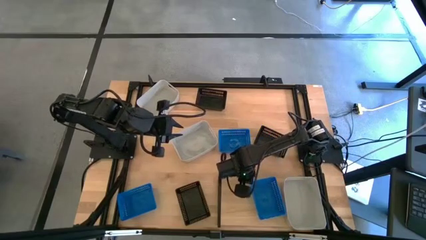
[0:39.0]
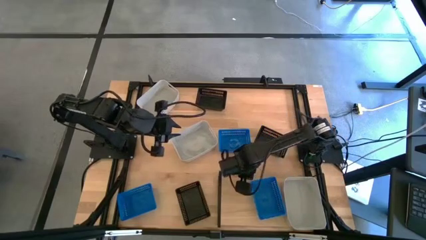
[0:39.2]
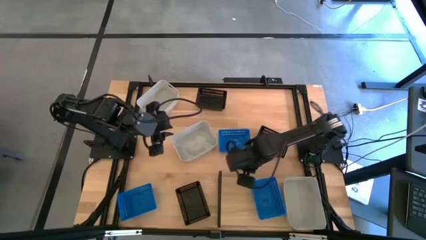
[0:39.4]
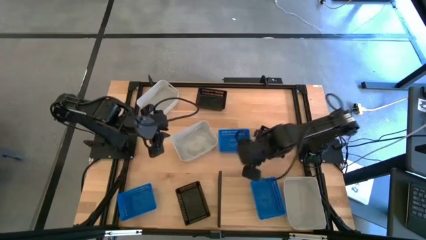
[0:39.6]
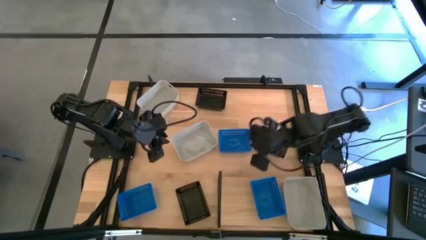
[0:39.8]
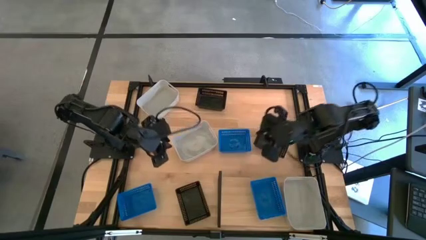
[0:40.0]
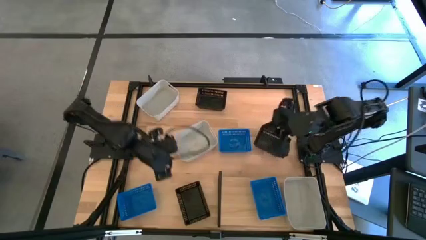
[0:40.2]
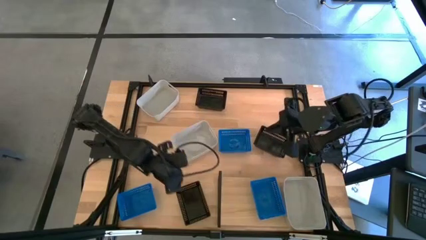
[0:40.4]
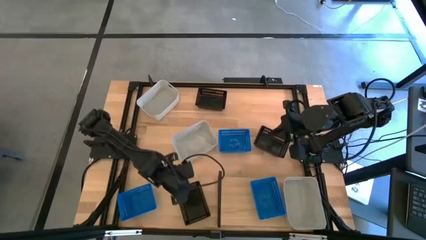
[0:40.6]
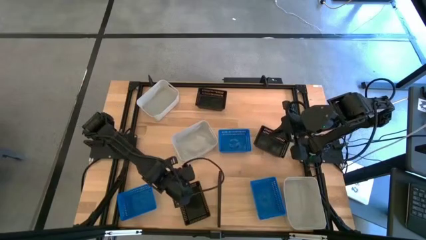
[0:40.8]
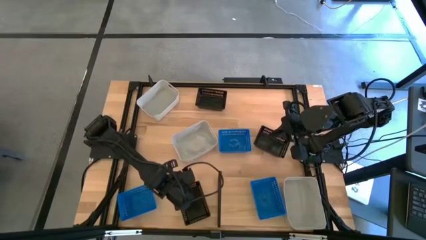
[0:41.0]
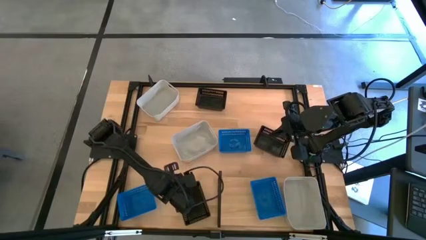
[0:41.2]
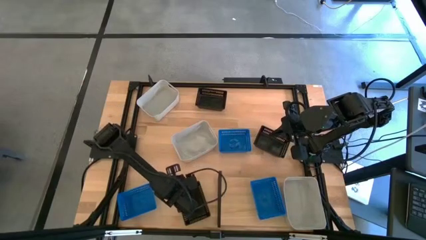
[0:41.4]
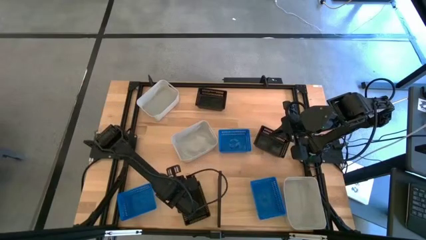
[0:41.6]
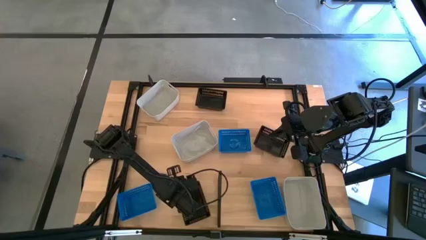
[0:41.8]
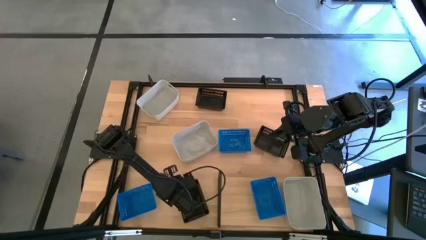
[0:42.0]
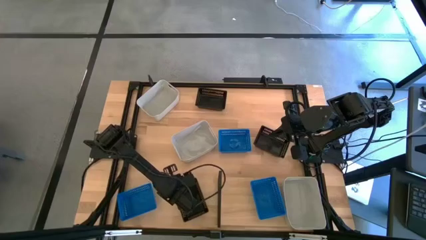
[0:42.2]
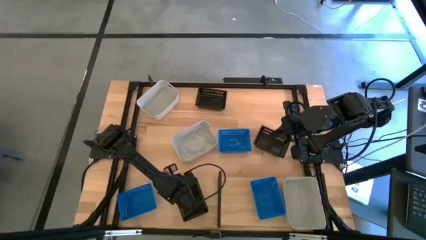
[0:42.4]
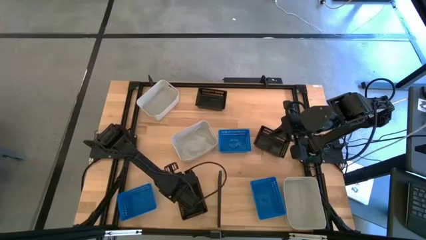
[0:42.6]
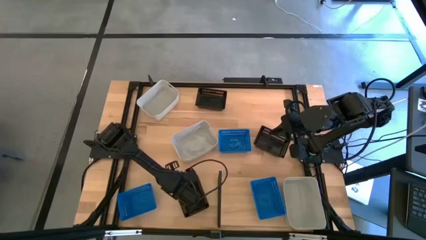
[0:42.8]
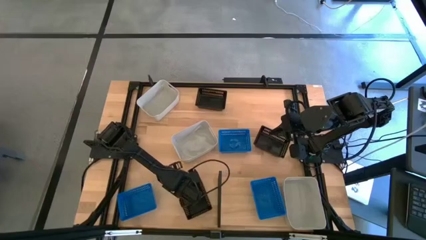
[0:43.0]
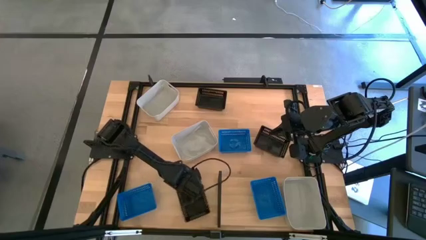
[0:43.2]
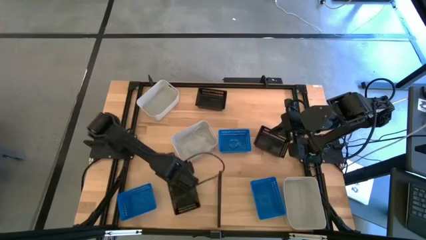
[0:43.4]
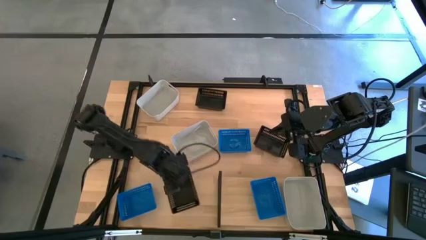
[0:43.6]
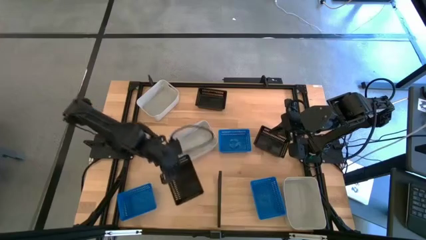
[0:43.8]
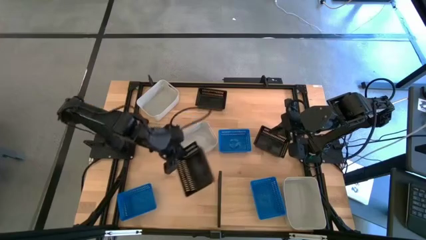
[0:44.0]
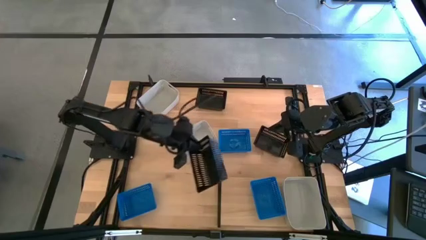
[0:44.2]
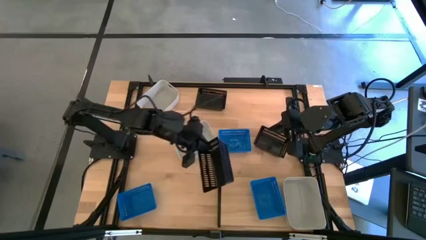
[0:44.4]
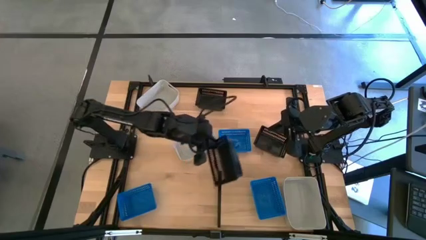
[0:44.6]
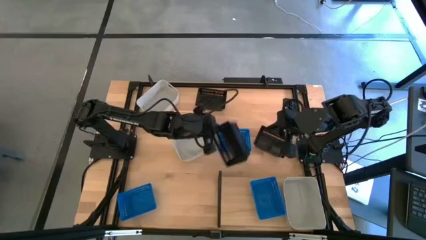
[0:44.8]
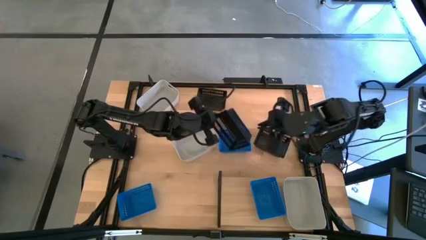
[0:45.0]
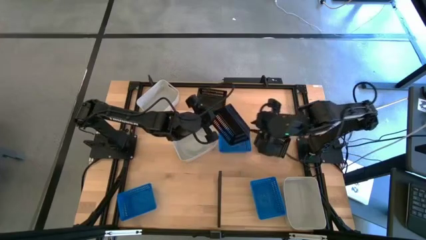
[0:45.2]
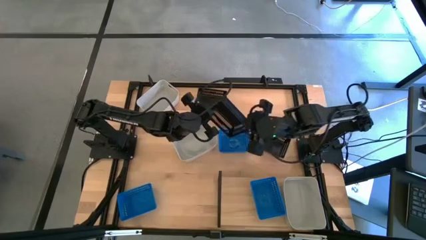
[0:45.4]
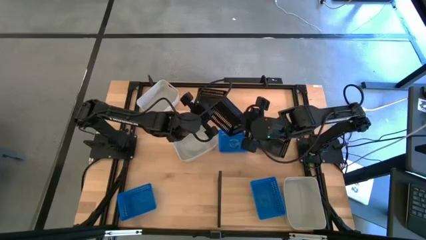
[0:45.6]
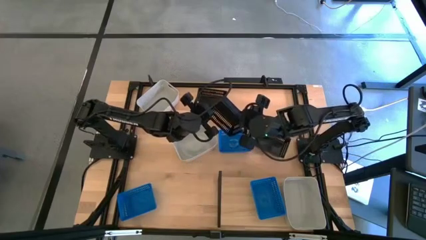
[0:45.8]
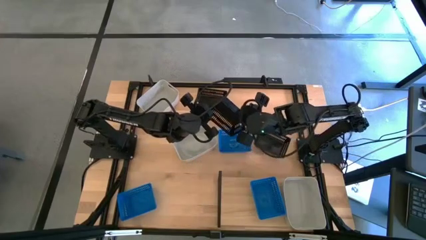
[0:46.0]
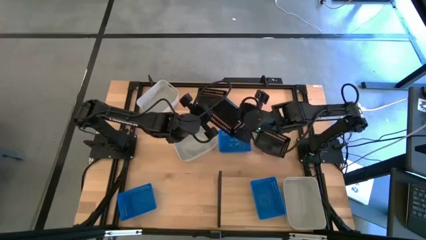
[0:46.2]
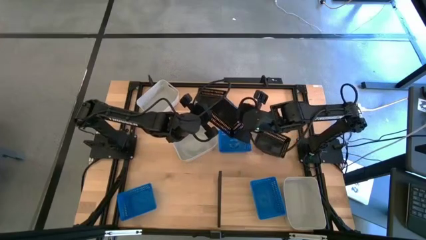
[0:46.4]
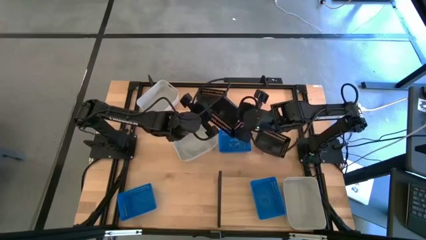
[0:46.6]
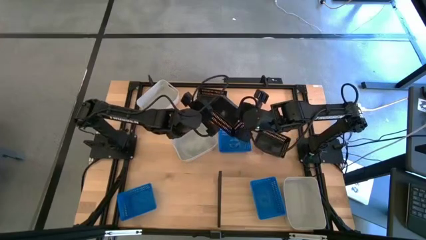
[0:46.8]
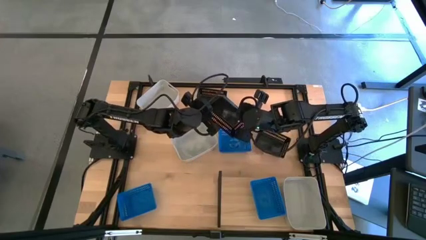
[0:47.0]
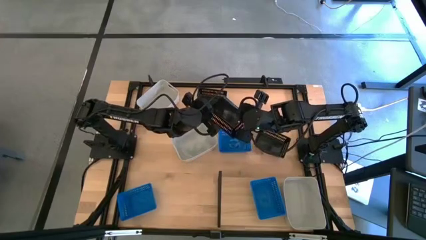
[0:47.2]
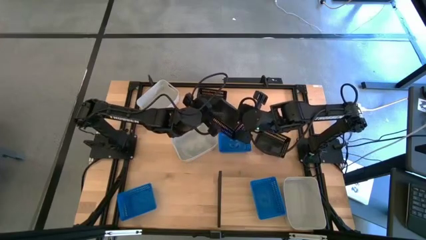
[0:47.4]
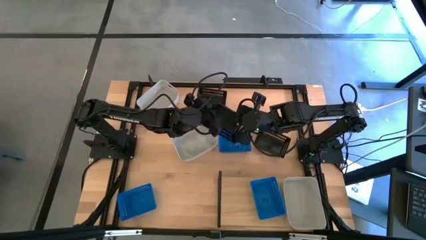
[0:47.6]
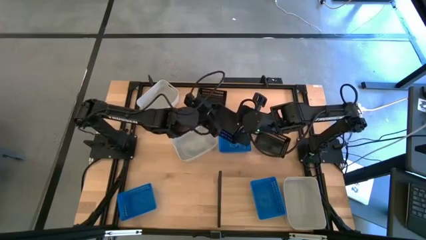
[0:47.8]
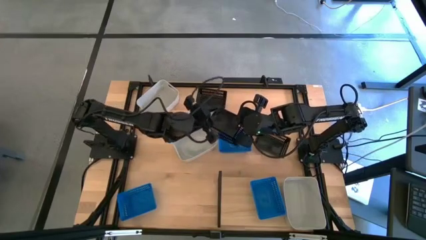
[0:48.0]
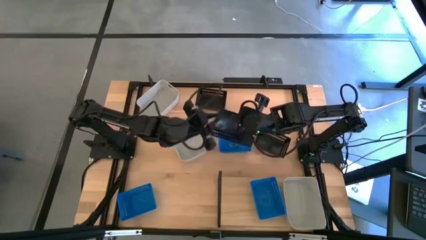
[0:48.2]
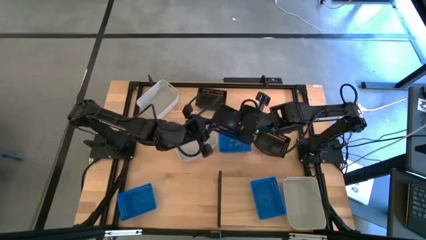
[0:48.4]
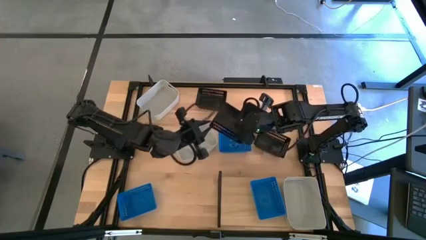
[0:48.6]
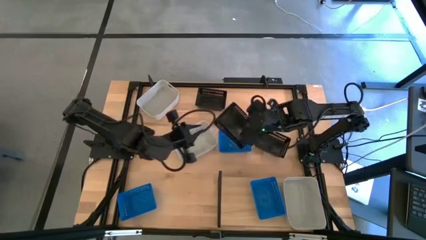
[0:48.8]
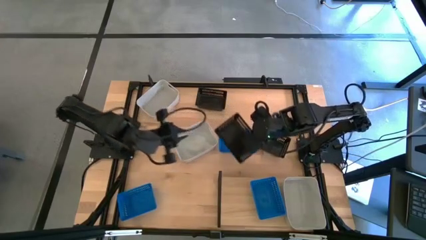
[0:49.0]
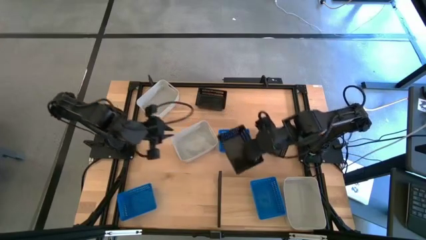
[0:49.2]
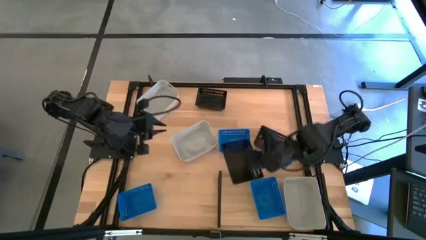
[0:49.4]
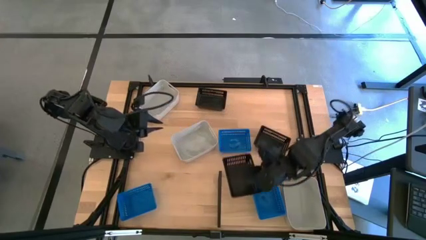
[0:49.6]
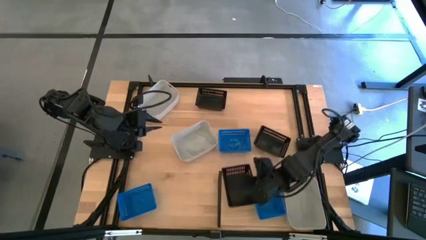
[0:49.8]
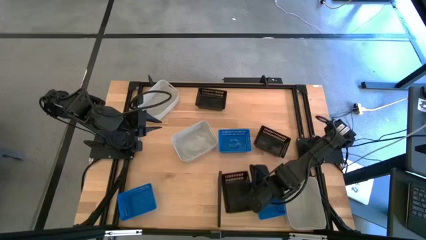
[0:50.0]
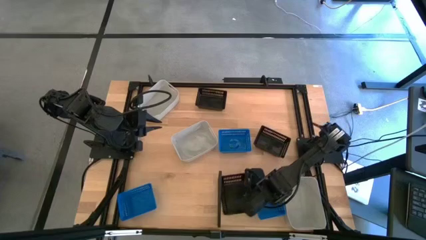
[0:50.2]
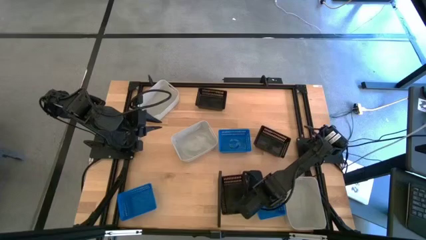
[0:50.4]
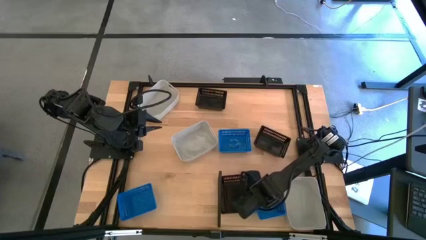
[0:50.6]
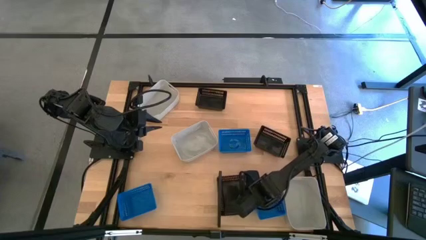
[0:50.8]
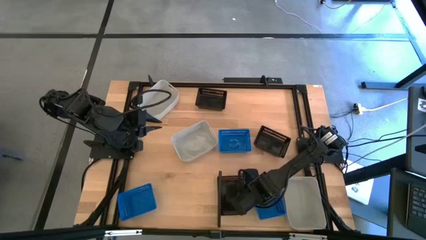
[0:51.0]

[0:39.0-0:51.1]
Task: Stack baskets on shelf by color
Put the bottom black bin on the shelf

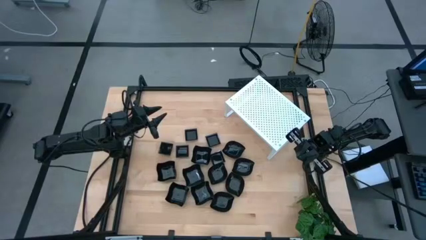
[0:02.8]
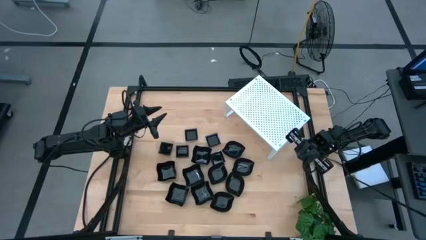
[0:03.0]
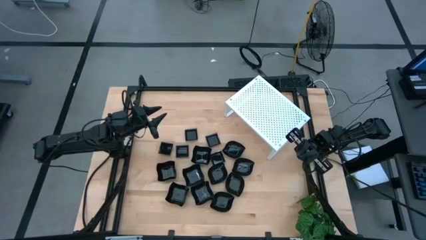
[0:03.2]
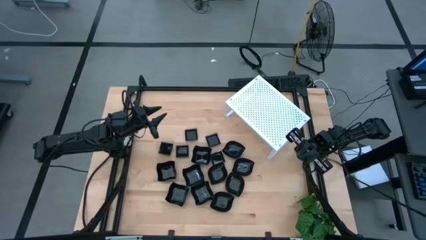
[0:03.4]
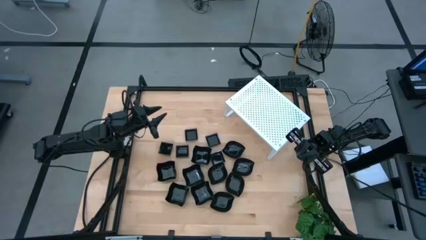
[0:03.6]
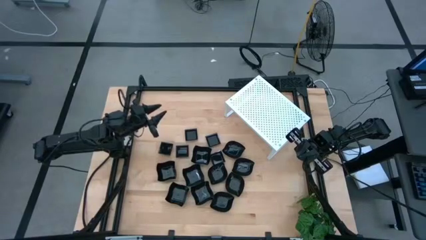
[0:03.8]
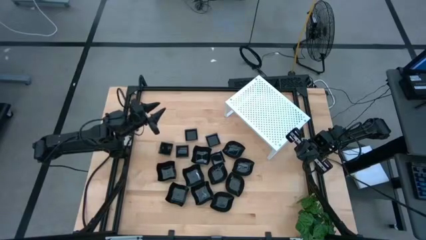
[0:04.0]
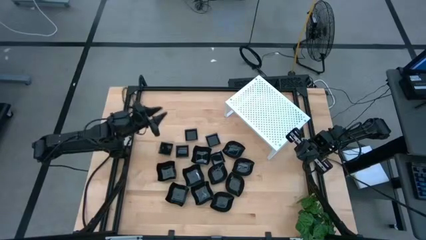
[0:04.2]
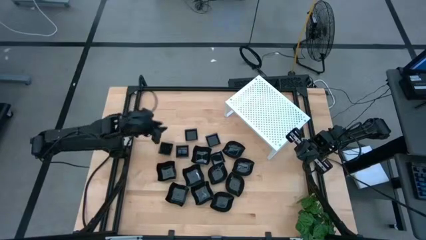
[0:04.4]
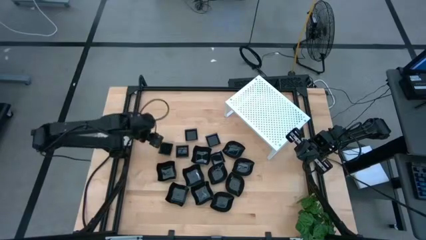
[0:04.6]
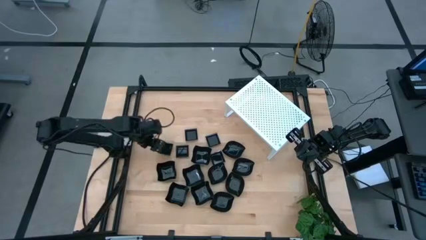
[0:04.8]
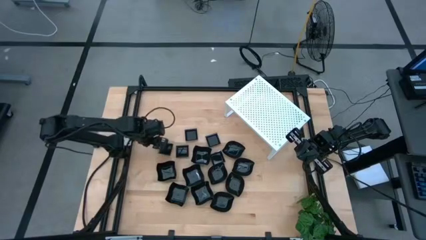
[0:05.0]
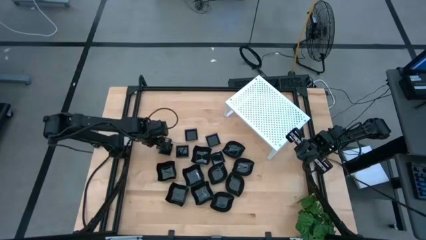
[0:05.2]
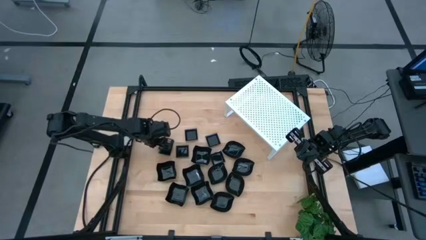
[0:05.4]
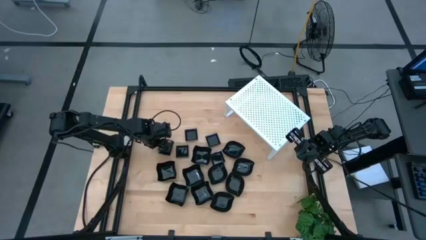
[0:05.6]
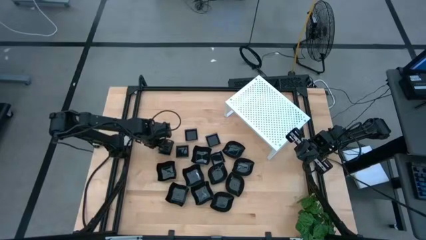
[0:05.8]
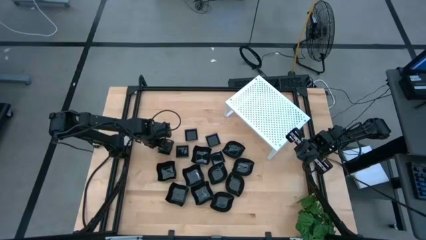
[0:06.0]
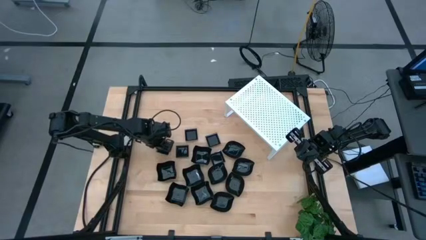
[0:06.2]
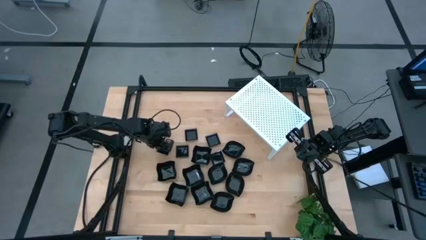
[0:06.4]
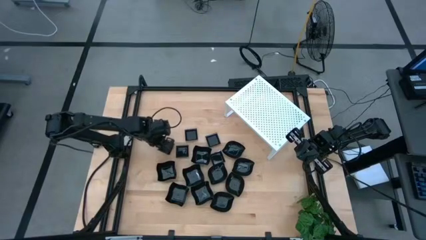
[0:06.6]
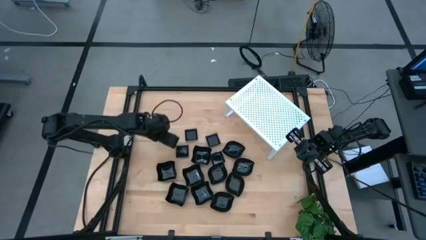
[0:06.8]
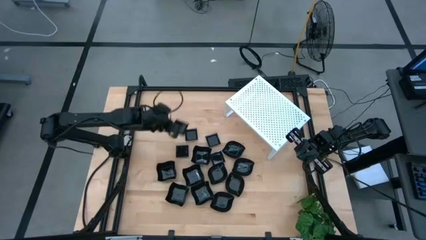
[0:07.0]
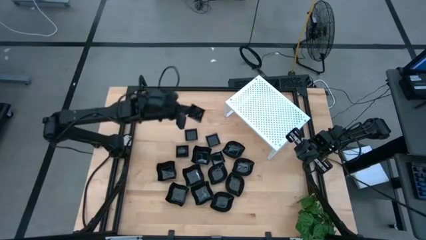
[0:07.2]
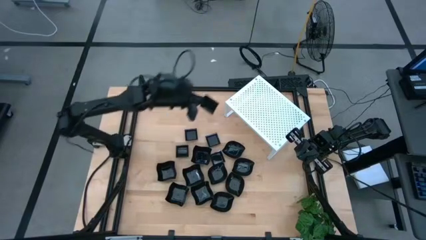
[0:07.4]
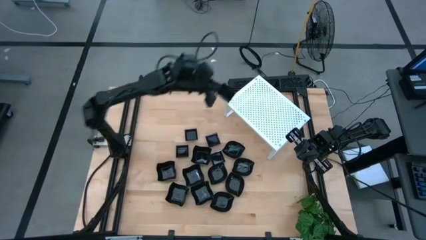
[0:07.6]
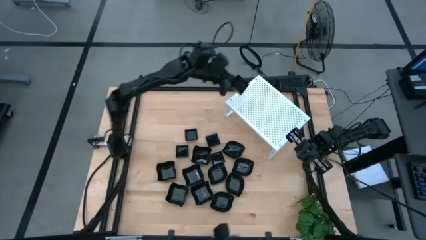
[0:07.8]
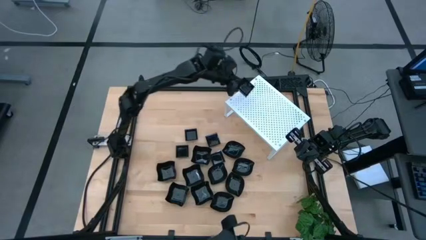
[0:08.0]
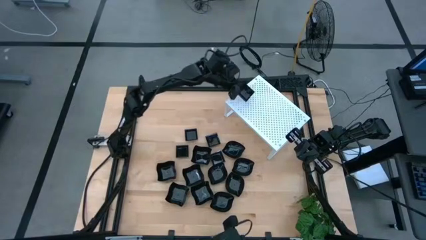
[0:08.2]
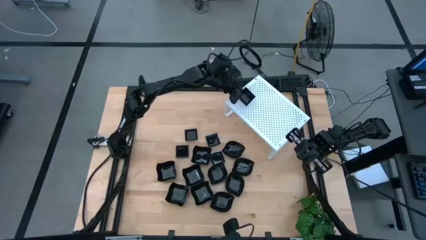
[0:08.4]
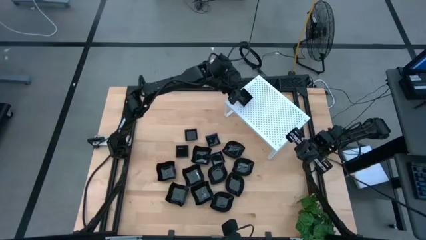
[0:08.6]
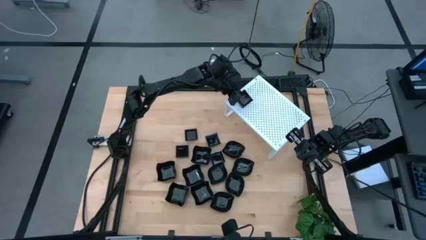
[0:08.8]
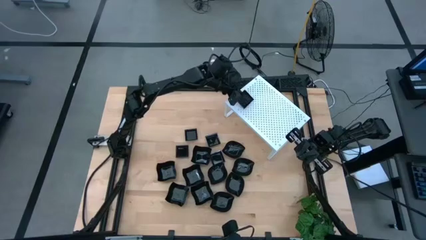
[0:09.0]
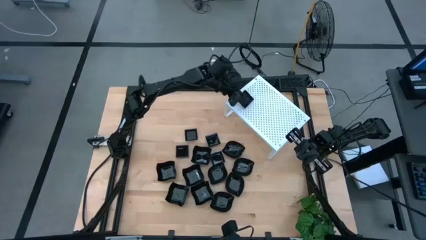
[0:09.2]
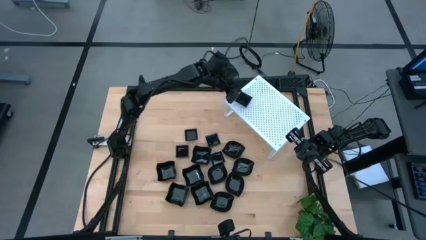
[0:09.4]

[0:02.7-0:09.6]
Task: Pick & Place Mini shaped plates
Put the black square plate on the shelf
